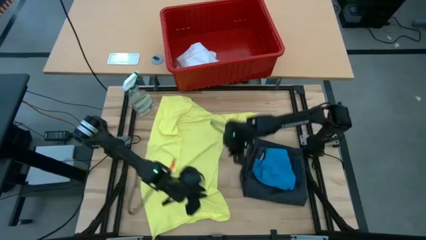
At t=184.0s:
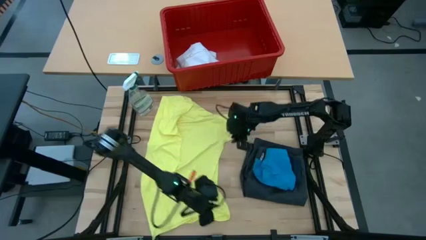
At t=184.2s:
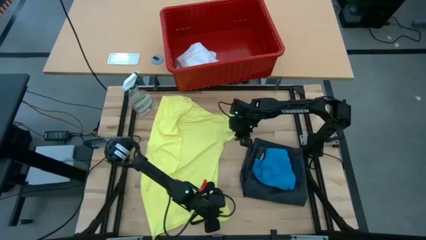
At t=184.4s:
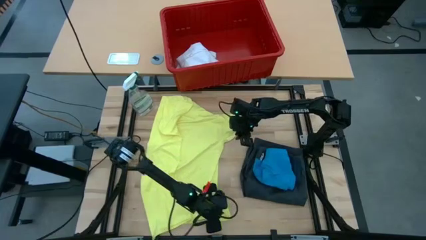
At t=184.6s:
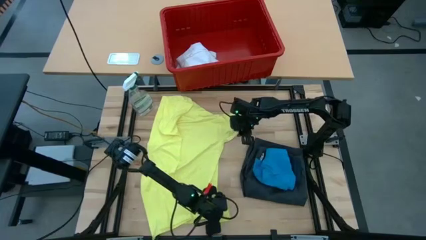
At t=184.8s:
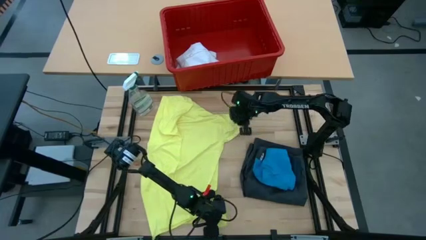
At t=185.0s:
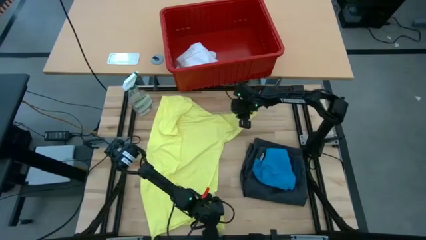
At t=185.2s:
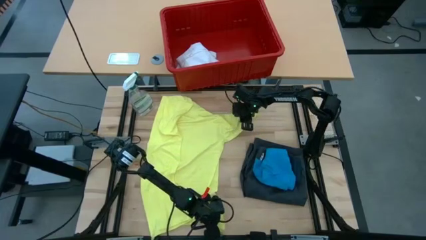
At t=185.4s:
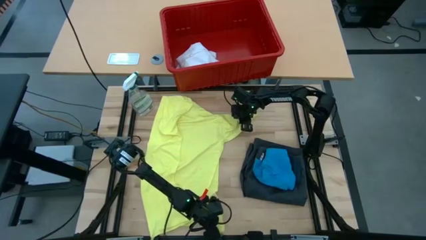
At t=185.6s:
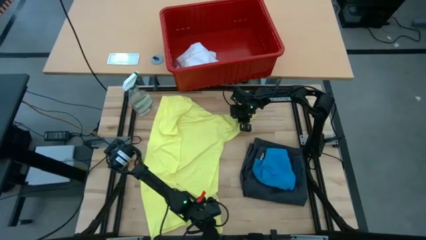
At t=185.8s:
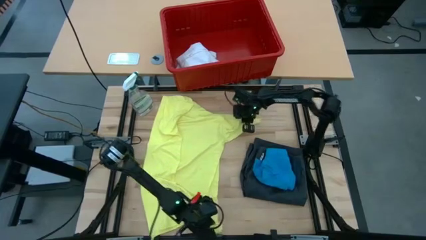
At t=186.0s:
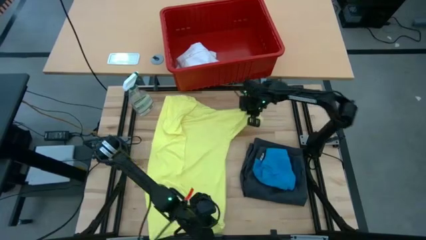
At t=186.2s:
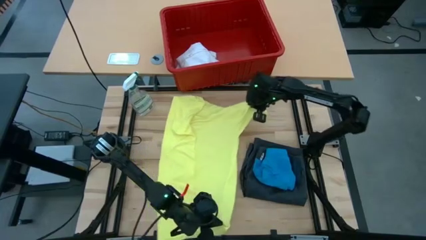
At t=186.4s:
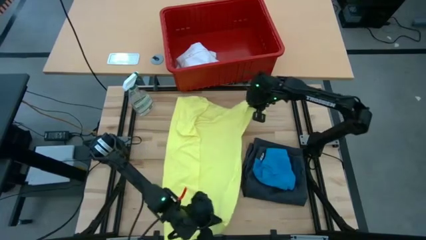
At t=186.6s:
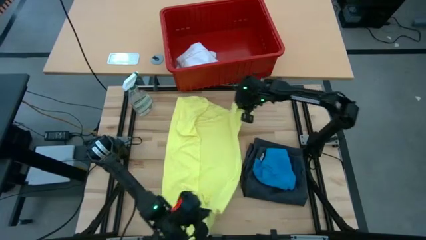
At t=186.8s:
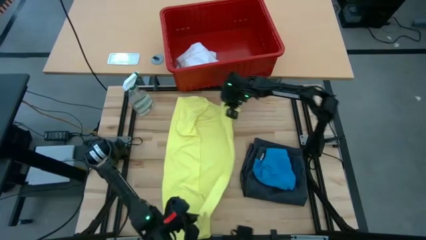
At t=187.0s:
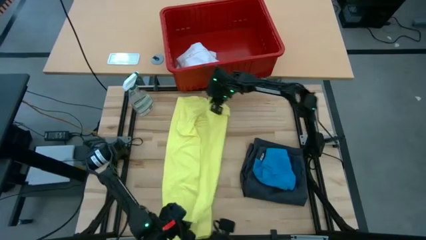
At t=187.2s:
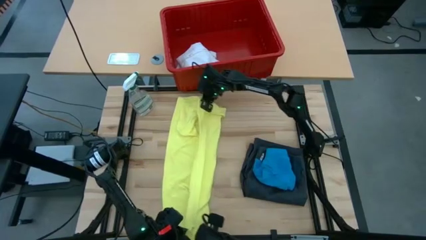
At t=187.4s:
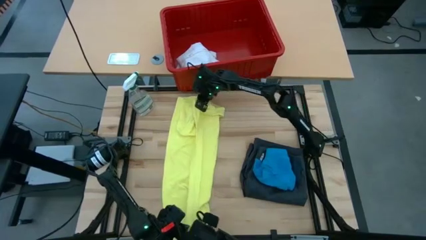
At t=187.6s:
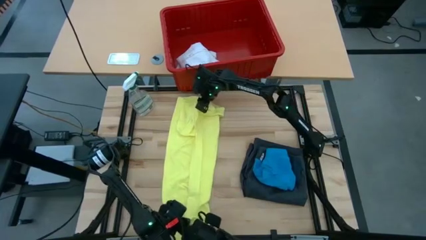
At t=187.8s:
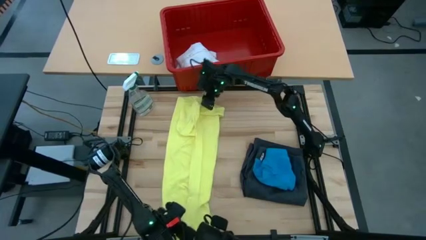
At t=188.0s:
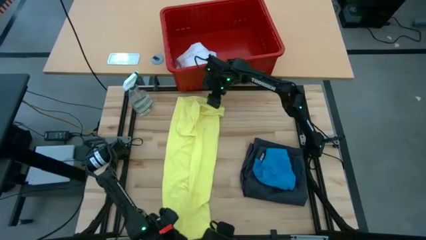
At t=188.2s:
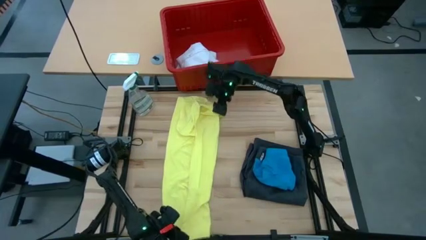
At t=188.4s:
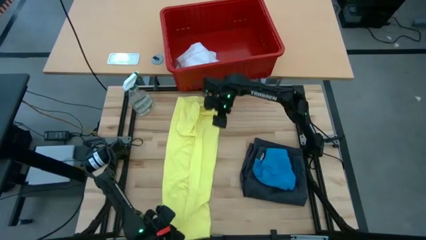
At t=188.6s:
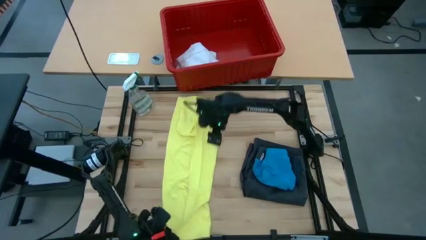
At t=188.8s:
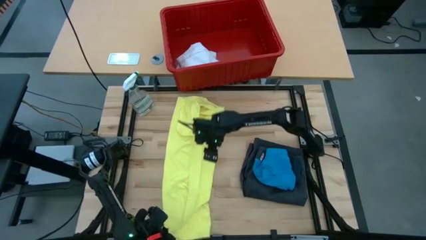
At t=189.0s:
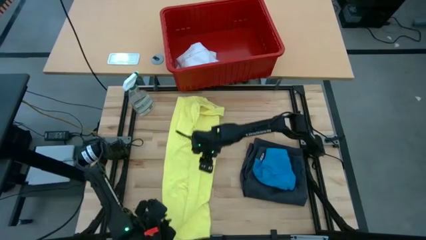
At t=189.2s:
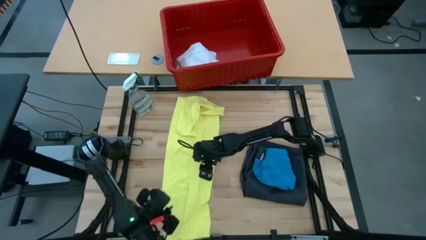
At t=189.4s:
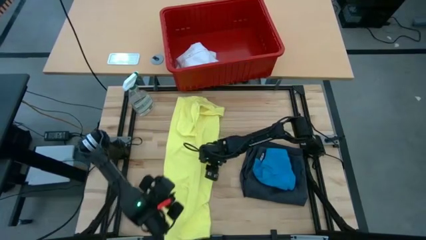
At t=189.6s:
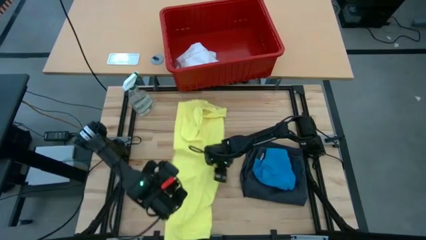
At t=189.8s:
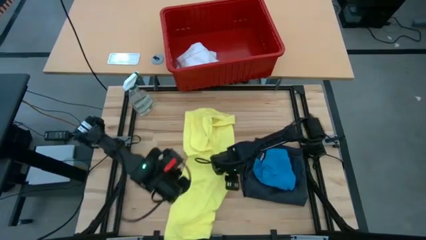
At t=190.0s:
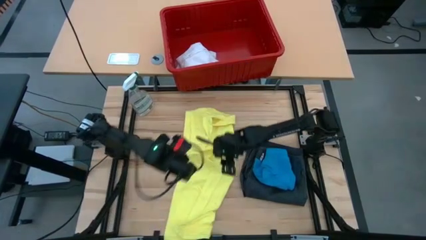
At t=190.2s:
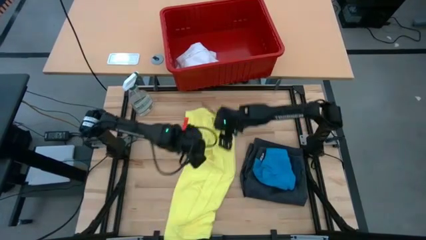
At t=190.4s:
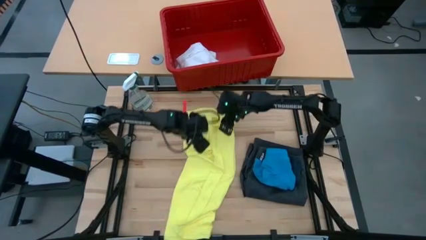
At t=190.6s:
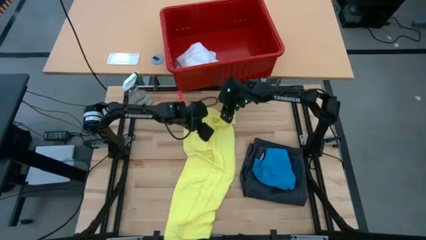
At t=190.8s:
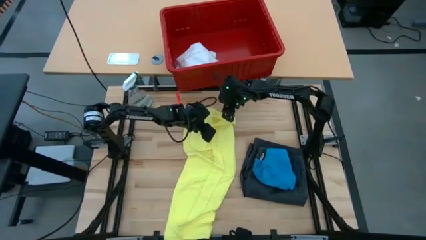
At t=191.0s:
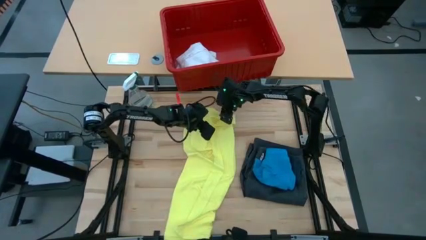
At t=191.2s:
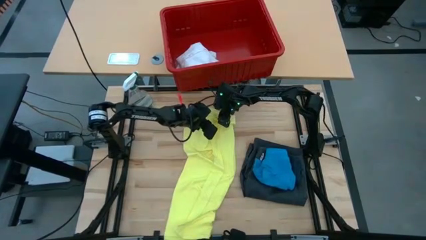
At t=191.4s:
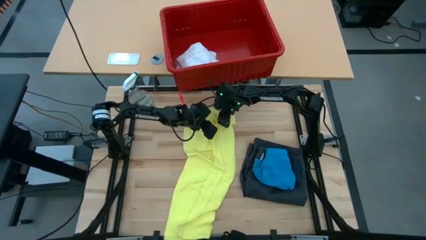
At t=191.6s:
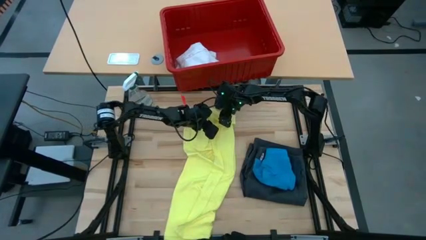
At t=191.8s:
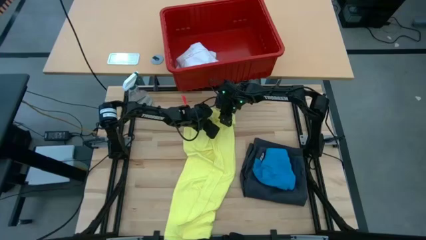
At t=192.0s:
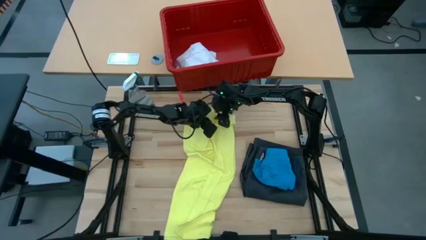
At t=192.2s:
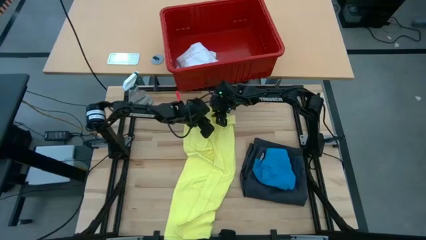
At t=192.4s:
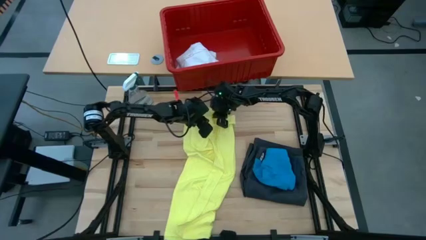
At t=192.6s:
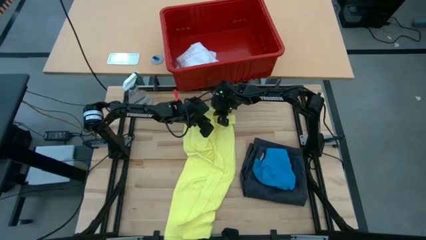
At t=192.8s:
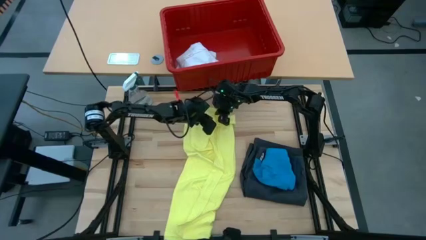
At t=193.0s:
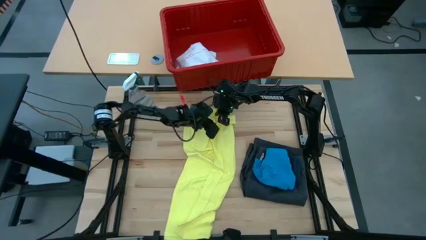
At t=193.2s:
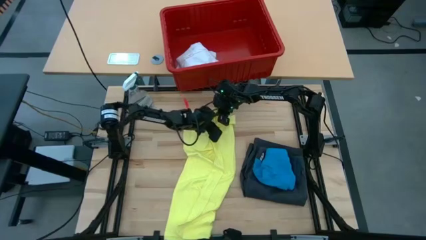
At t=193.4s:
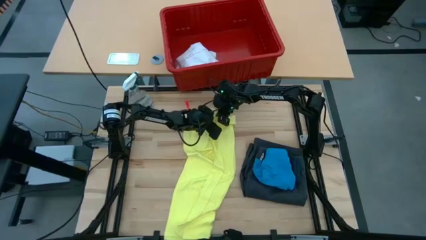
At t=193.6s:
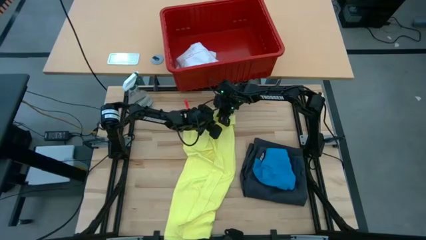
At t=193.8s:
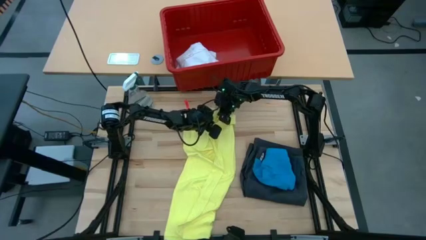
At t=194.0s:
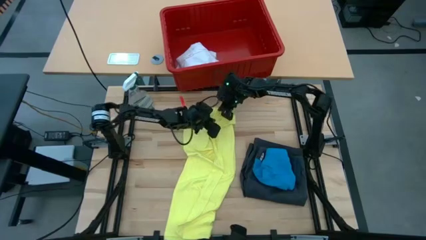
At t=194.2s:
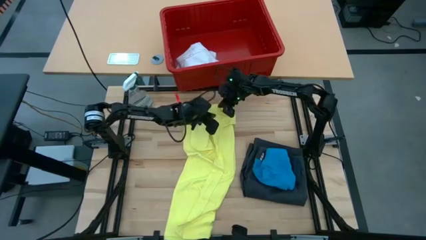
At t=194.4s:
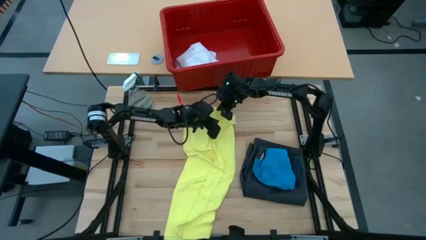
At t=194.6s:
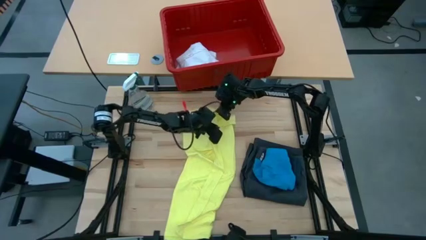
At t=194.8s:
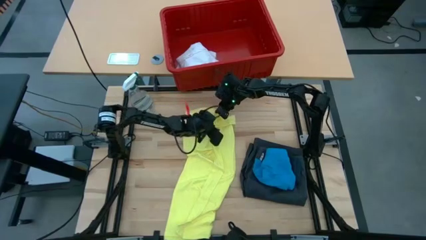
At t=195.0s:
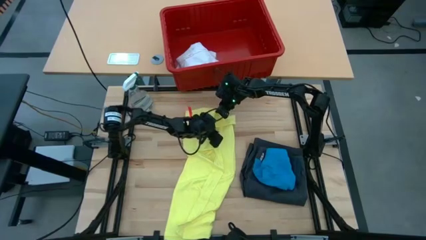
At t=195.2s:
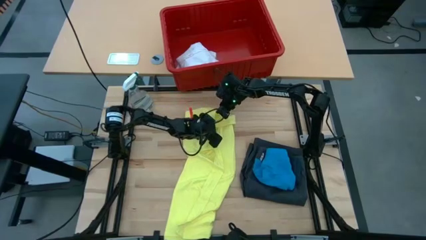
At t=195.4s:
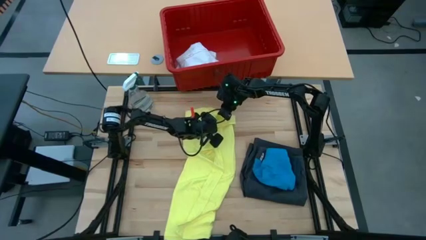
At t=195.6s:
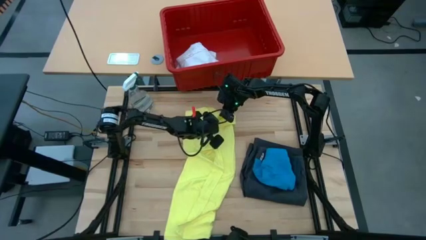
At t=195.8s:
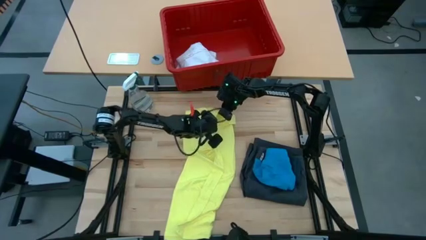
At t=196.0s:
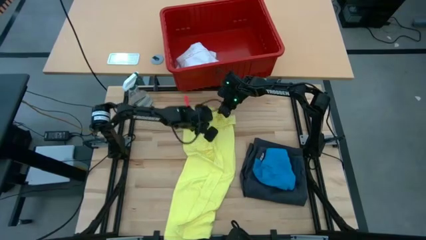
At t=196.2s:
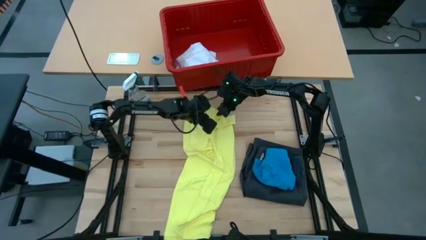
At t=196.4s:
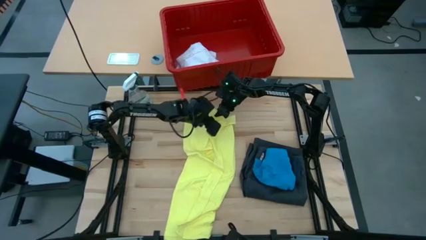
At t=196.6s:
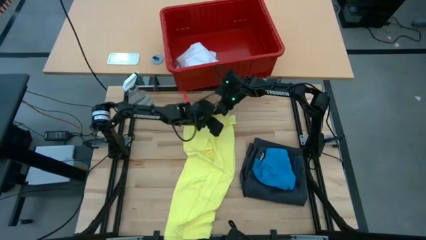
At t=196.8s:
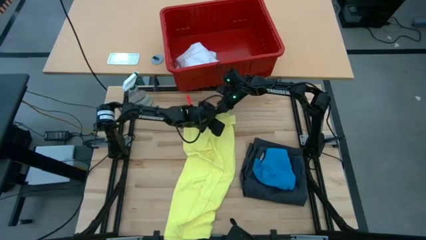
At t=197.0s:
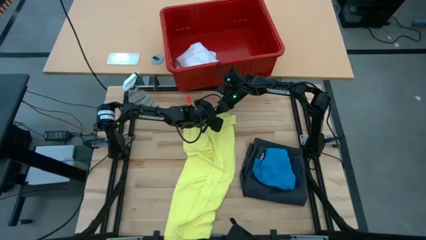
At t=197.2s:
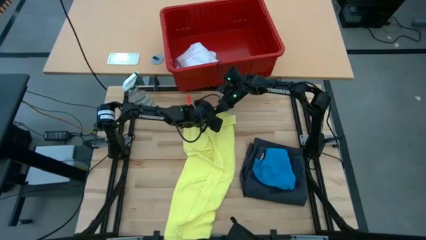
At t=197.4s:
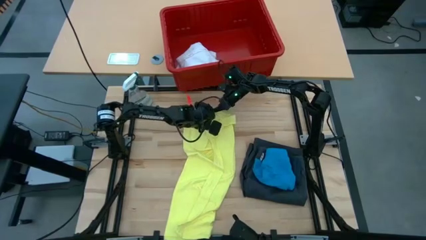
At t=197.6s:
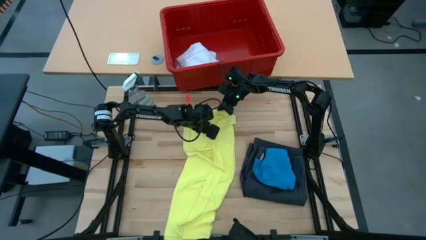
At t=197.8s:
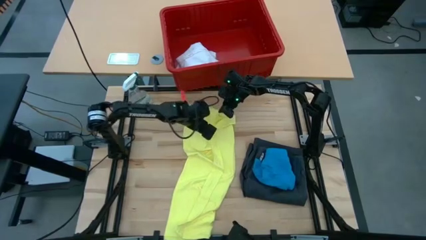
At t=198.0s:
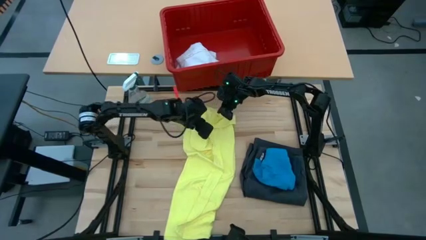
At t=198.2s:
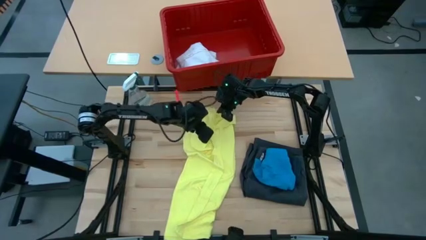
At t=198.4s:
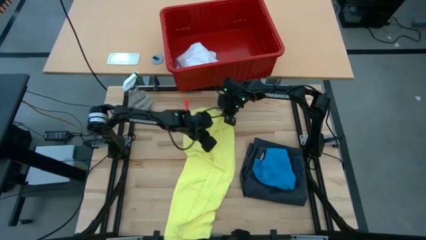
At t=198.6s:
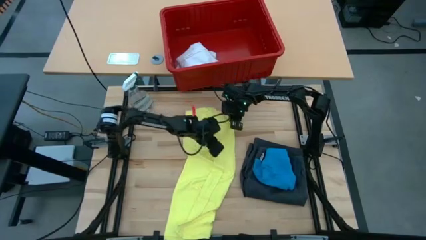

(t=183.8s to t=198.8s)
Task: Fold laundry
Fold the yellow shirt
